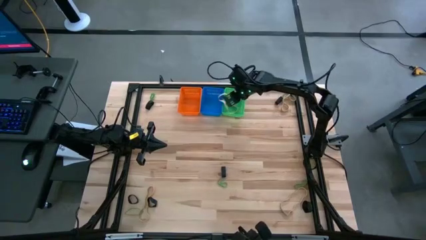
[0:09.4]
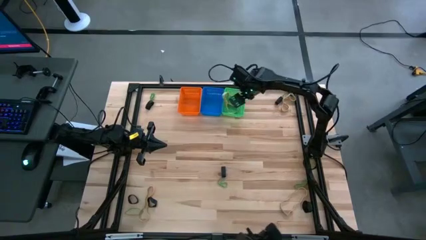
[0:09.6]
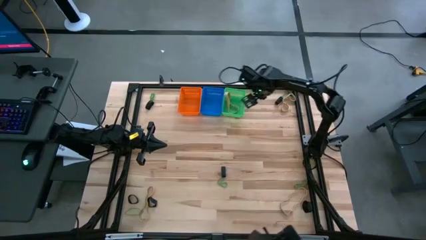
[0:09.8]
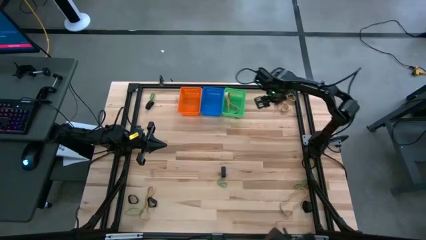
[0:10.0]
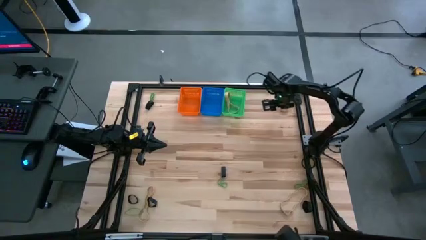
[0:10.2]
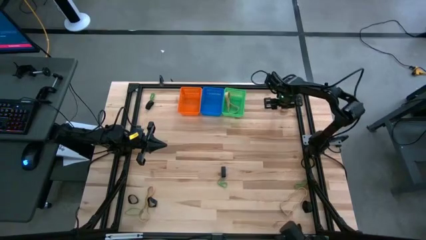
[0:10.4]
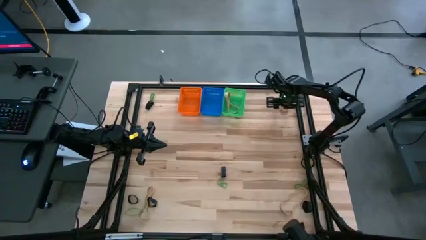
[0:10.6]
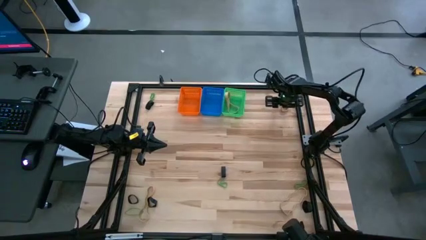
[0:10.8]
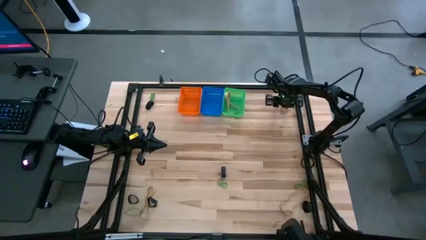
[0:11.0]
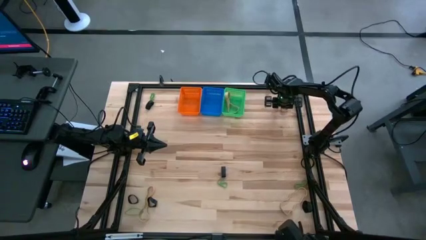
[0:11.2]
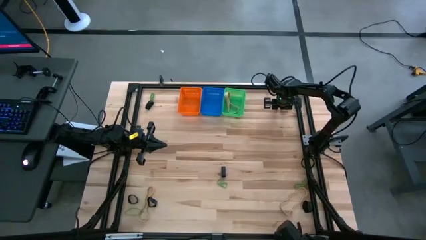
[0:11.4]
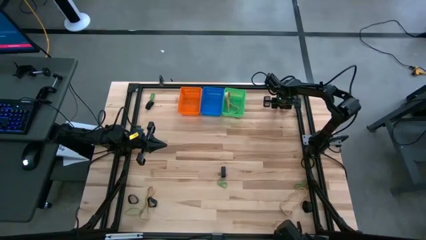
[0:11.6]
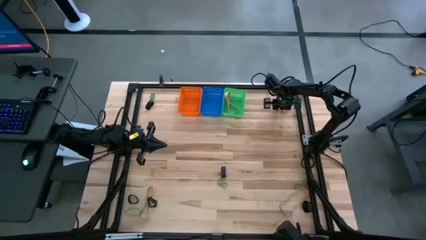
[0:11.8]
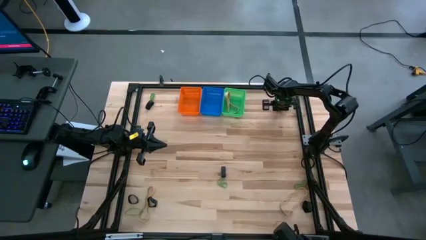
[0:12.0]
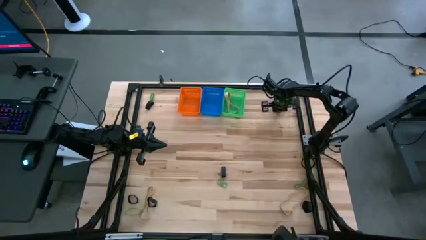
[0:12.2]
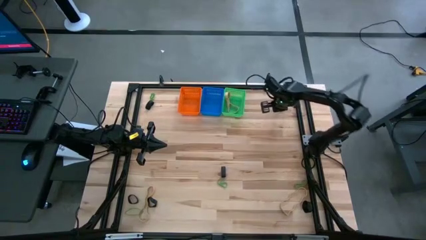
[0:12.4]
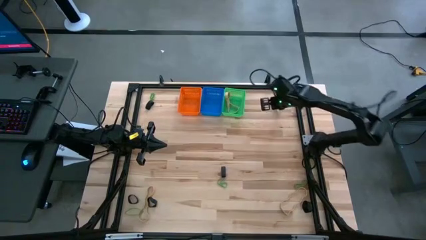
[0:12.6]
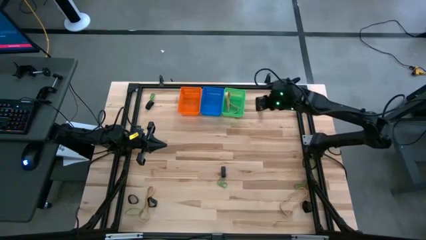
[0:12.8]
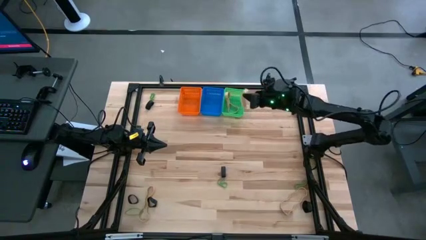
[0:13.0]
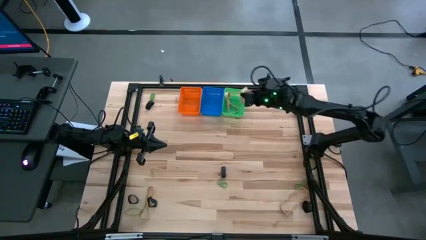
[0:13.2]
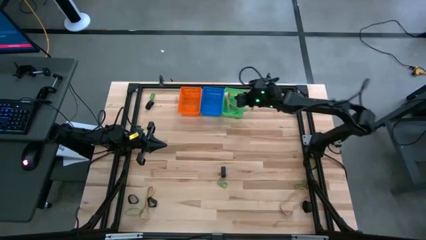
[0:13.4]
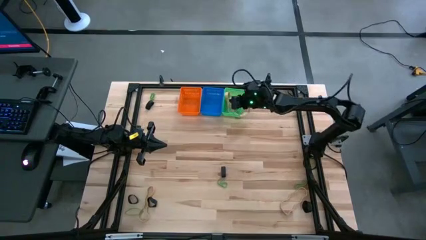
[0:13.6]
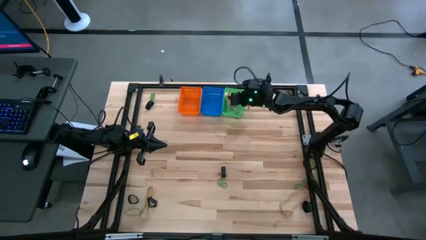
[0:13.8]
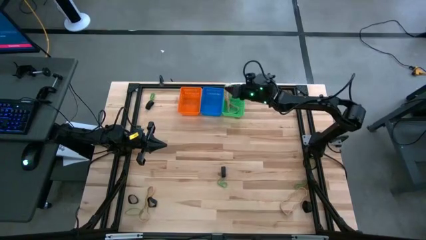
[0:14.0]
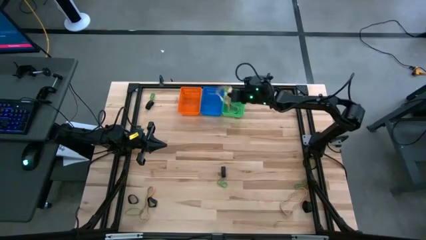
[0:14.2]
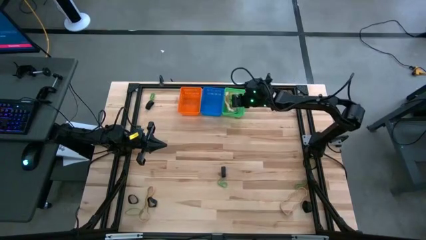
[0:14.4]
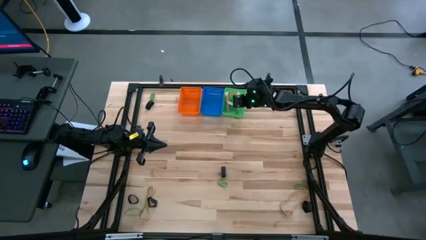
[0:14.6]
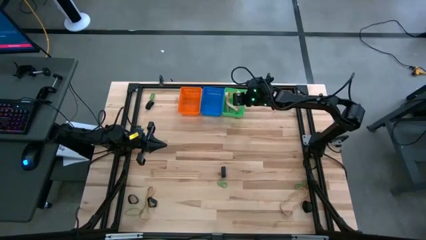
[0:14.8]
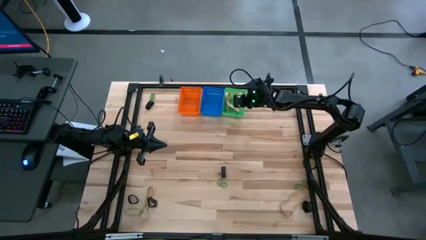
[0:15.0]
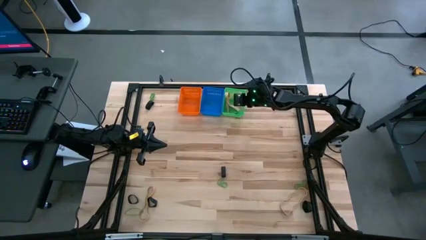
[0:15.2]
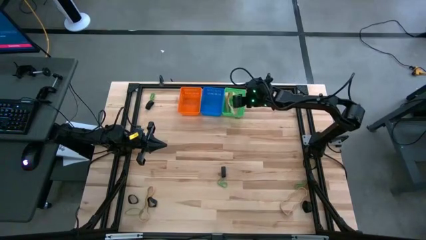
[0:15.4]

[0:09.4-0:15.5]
Task: Sort rubber bands into baskets
Put the brown rubber band into the green bin

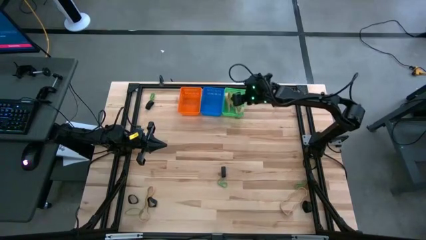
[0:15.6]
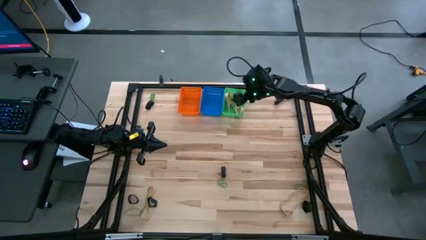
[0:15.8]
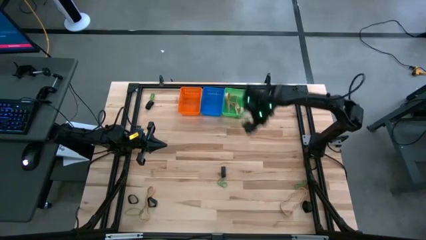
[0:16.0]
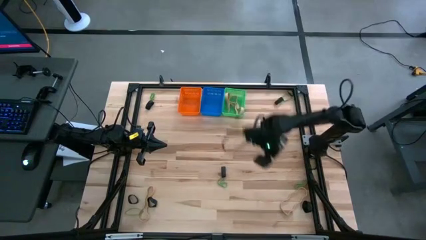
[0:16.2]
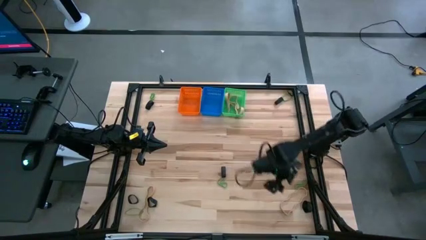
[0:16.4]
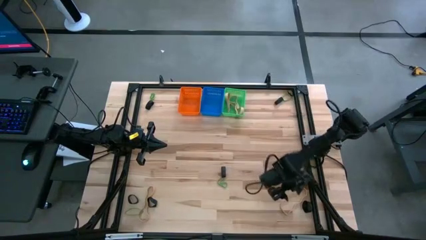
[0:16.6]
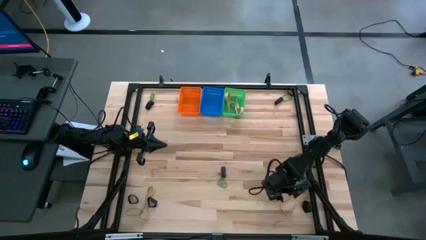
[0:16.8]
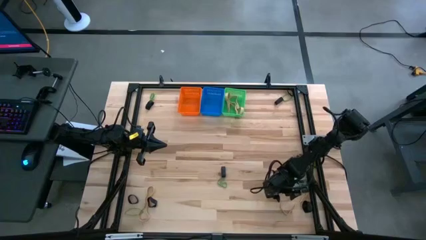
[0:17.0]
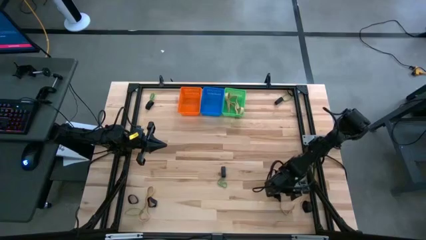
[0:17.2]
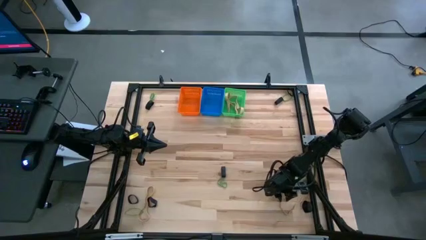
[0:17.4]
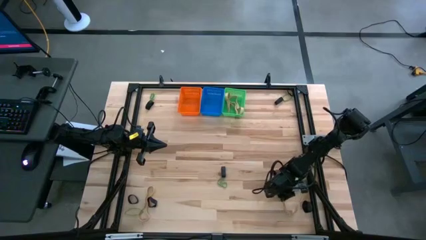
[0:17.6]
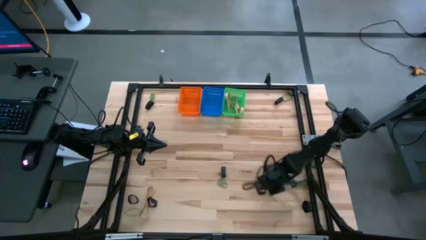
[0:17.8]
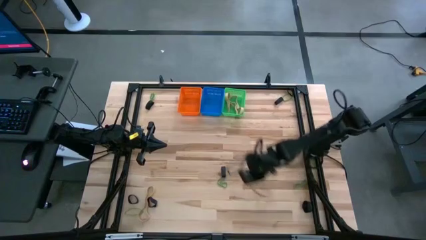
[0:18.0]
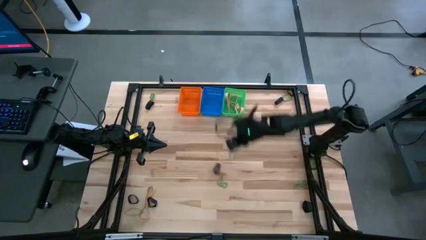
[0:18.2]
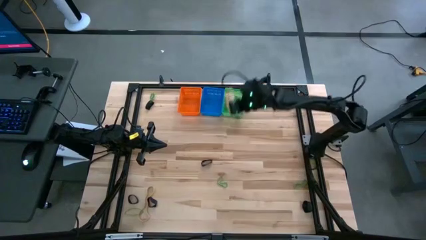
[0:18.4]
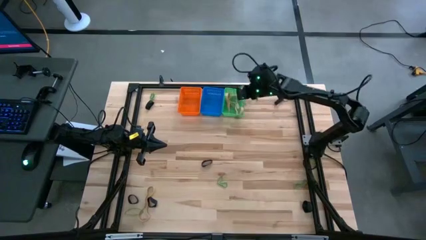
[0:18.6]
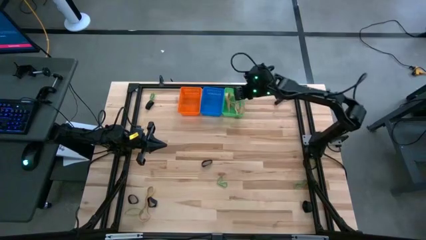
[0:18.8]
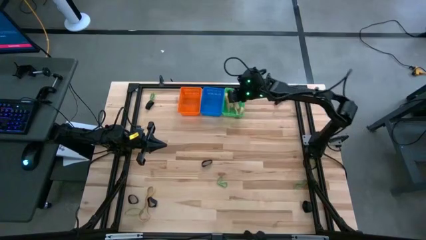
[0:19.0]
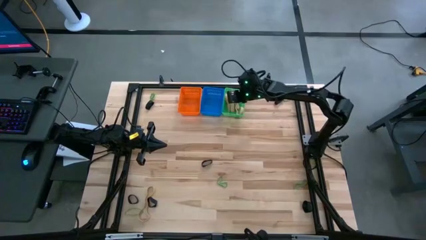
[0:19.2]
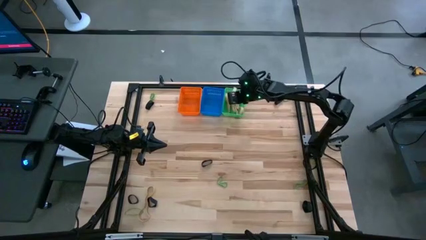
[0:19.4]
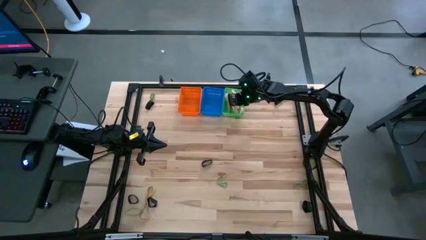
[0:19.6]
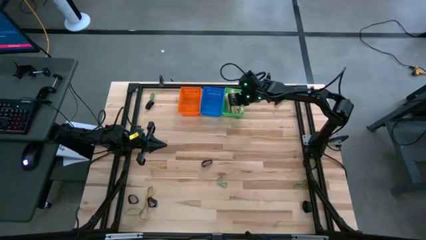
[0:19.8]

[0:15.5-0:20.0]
Put the brown rubber band into the green bin

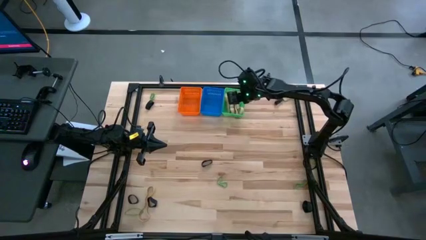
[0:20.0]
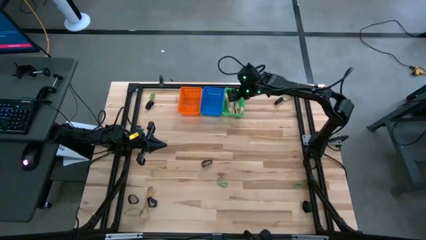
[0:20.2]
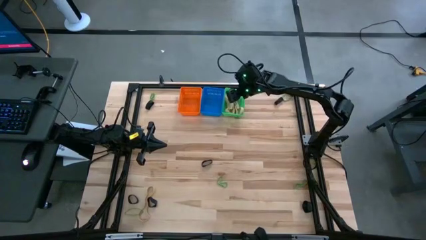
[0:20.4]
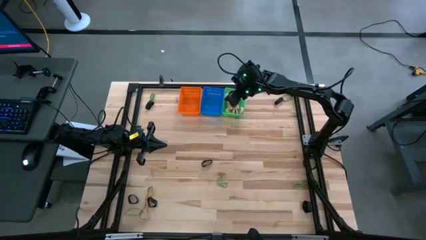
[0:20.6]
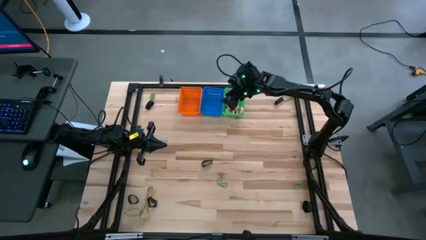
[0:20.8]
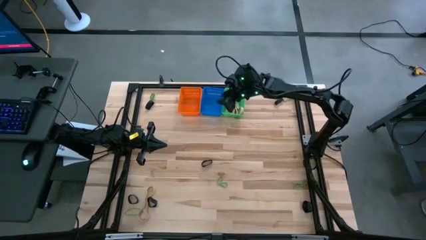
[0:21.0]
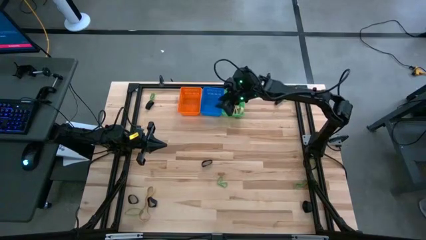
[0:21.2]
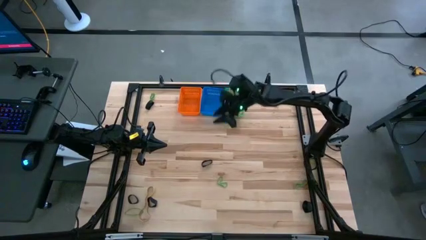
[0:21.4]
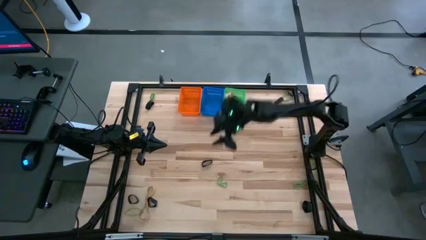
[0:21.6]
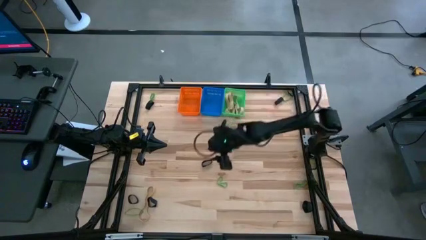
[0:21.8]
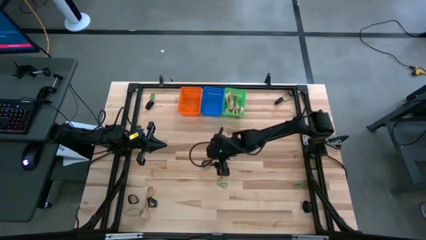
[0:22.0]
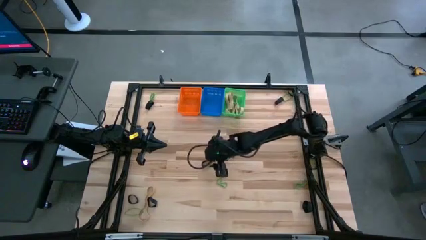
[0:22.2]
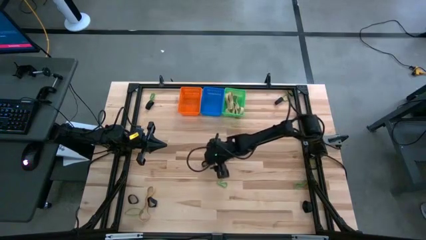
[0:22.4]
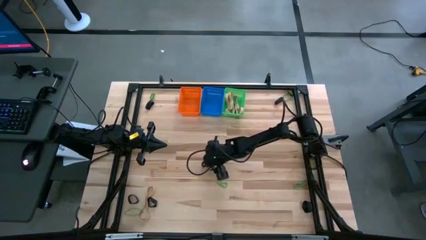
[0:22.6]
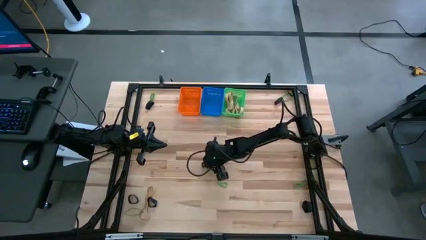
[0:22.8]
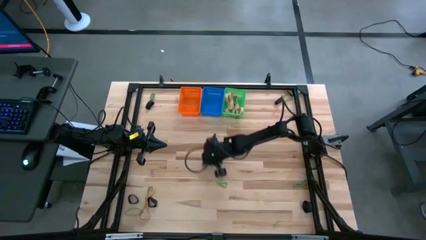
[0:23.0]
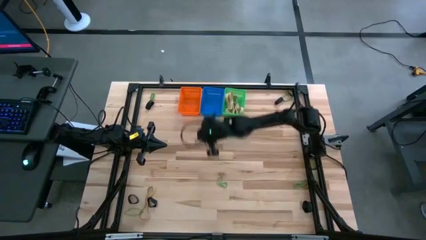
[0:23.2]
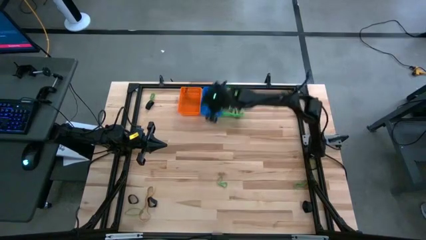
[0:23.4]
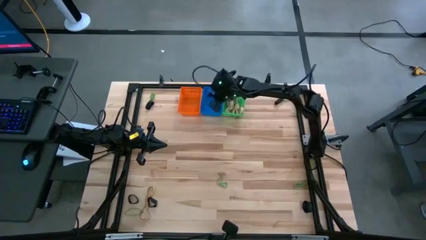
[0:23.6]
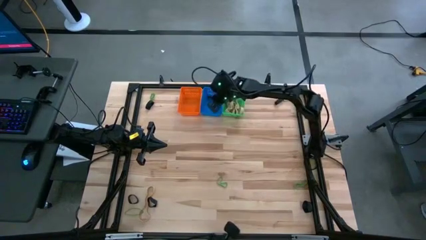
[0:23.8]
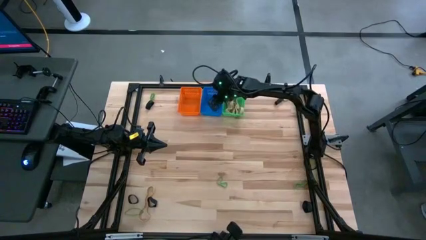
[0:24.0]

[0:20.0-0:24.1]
Put the black rubber band into the blue bin

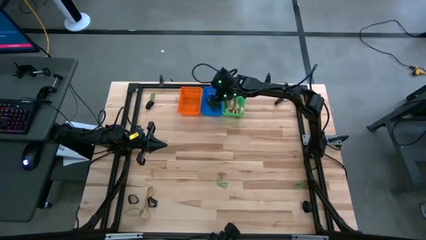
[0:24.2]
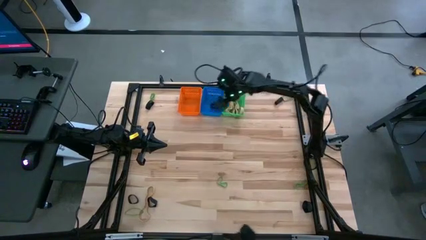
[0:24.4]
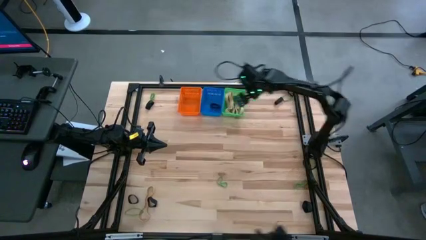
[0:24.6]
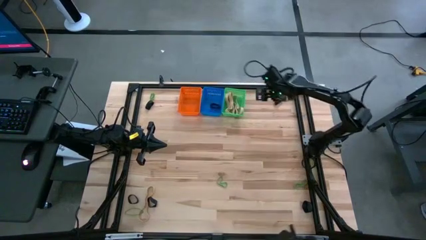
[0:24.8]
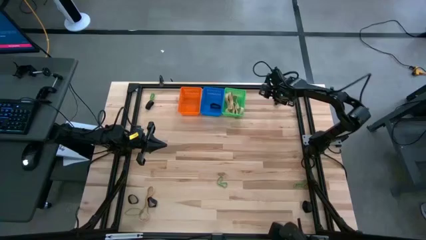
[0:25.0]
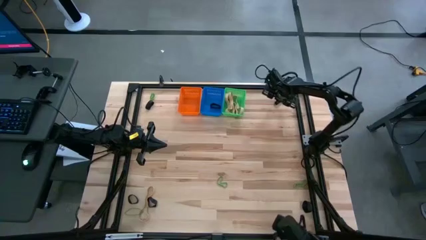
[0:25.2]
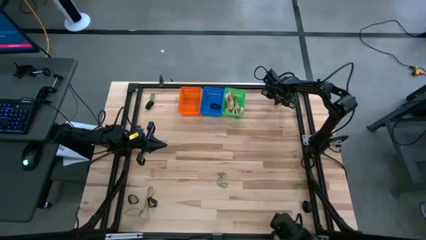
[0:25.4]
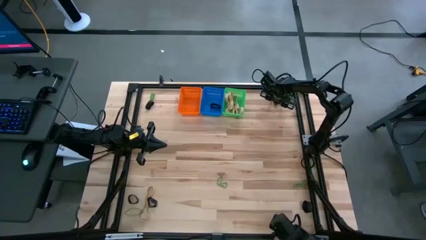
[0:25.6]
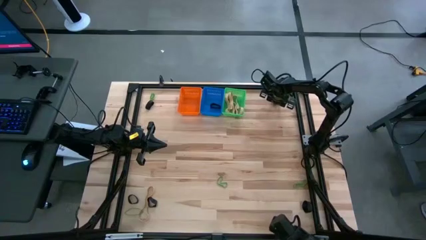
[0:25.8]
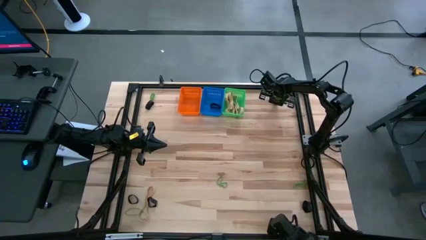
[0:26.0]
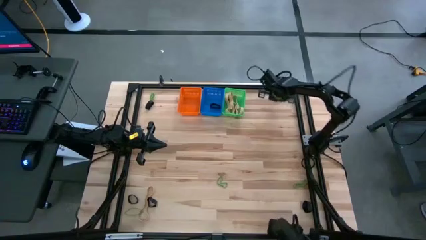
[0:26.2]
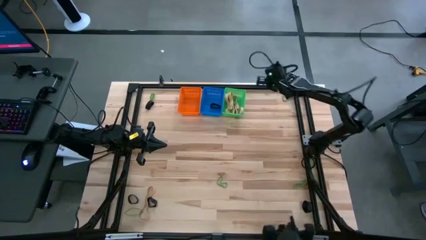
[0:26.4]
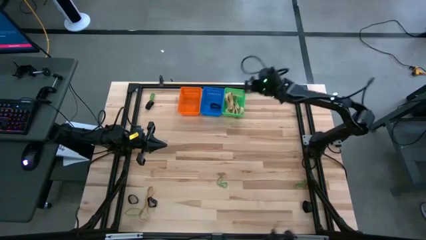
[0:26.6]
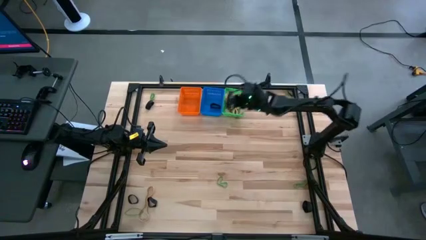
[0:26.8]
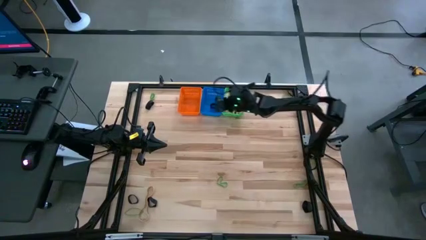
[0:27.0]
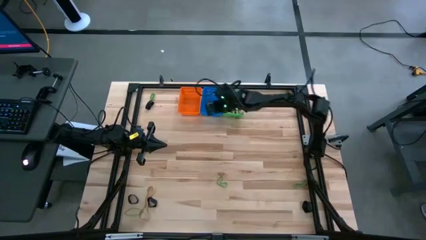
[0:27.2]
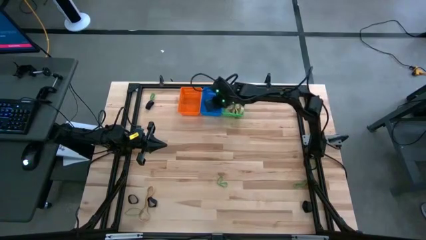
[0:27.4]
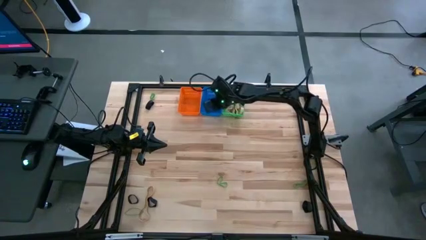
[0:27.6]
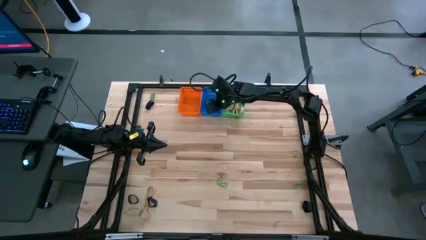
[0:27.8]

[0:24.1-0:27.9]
Put the black rubber band into the blue bin
